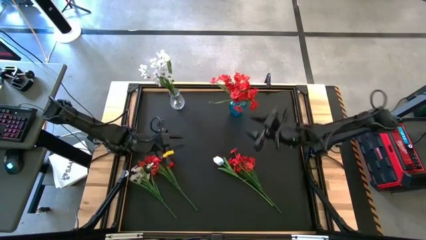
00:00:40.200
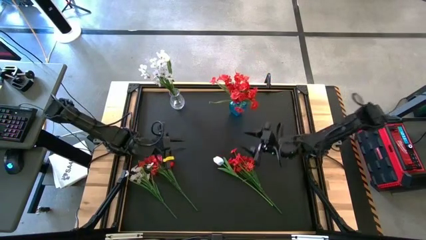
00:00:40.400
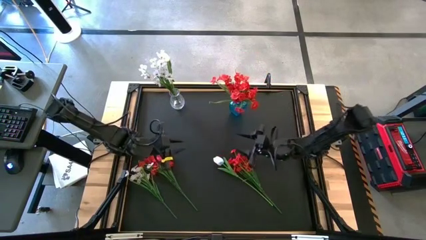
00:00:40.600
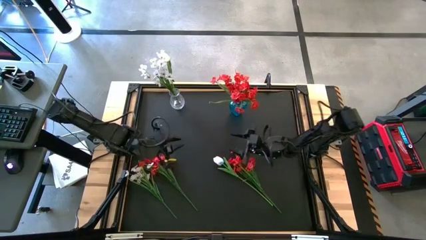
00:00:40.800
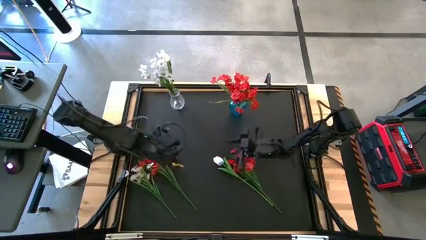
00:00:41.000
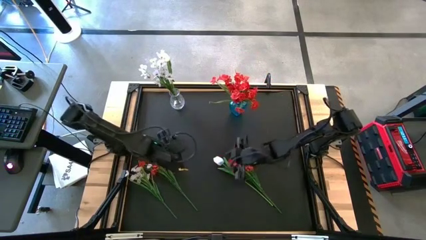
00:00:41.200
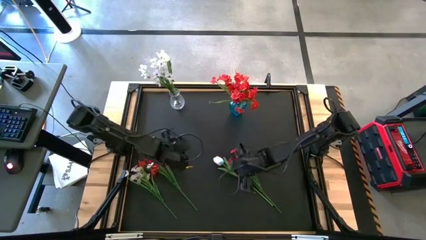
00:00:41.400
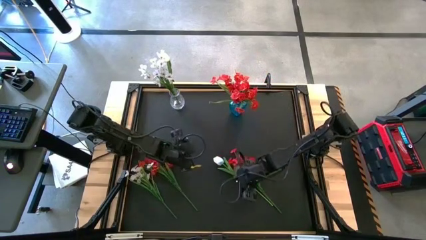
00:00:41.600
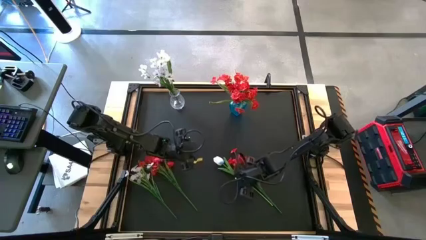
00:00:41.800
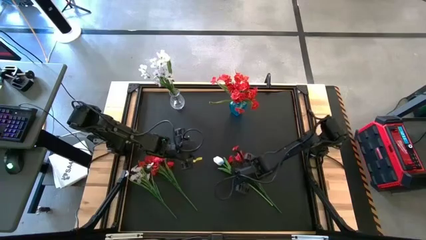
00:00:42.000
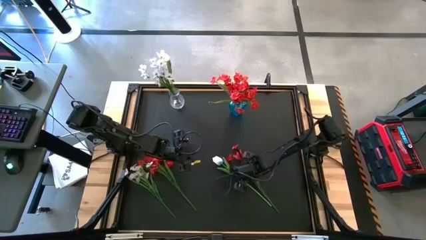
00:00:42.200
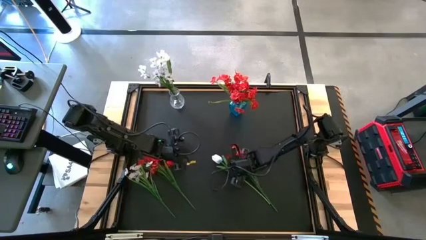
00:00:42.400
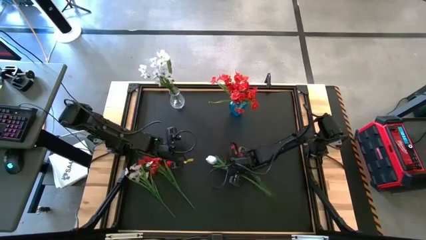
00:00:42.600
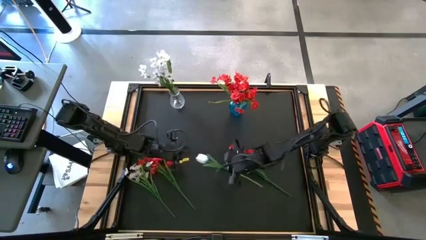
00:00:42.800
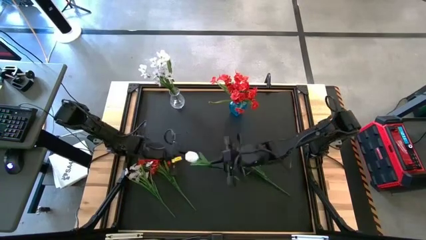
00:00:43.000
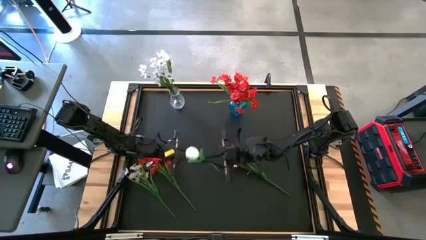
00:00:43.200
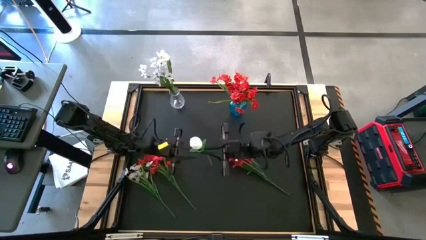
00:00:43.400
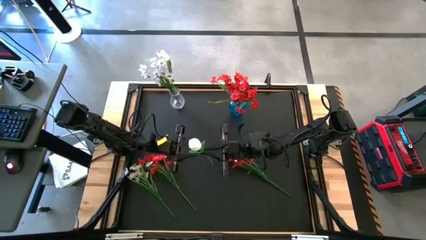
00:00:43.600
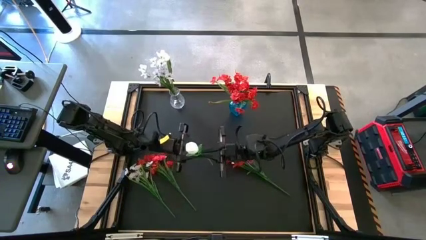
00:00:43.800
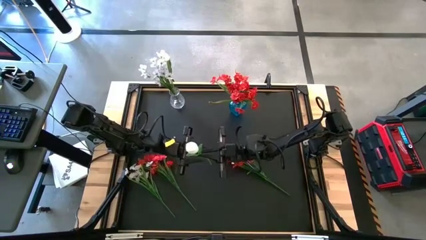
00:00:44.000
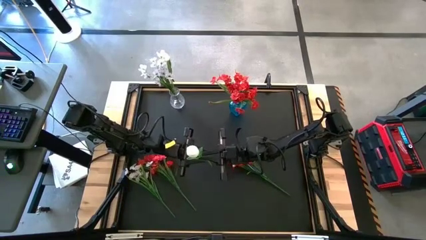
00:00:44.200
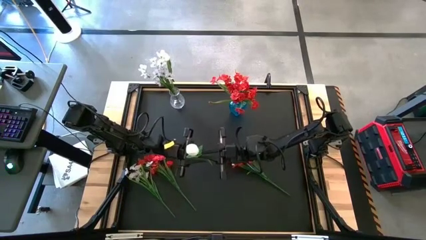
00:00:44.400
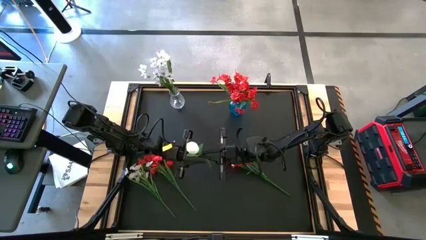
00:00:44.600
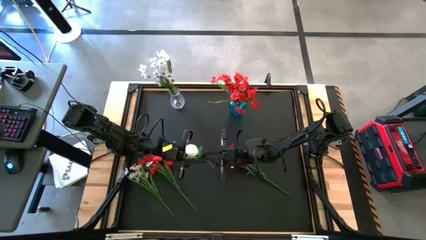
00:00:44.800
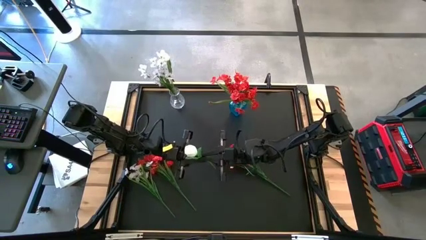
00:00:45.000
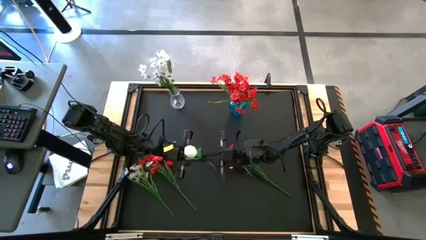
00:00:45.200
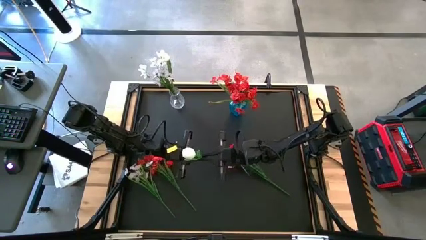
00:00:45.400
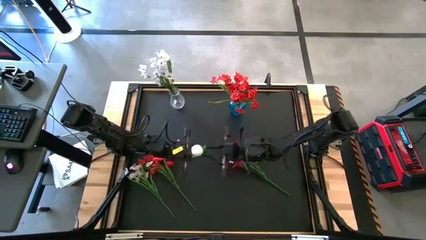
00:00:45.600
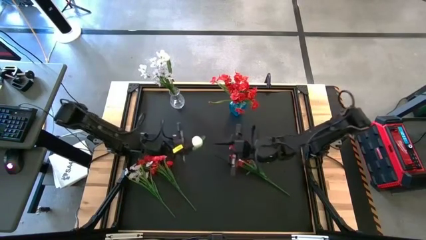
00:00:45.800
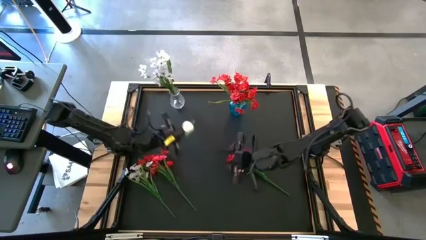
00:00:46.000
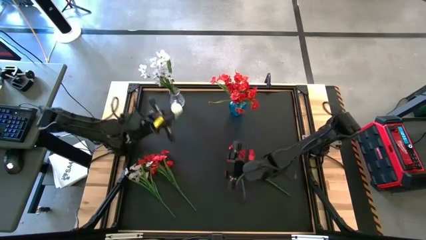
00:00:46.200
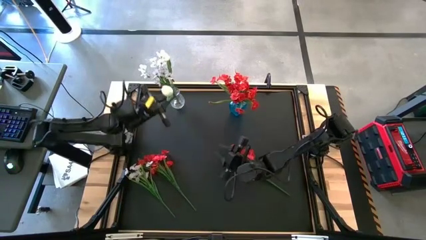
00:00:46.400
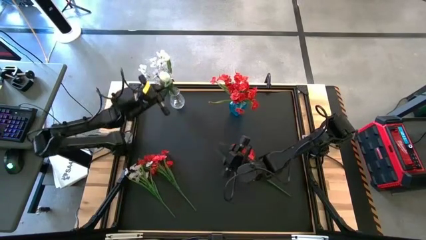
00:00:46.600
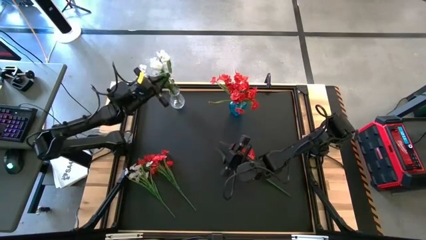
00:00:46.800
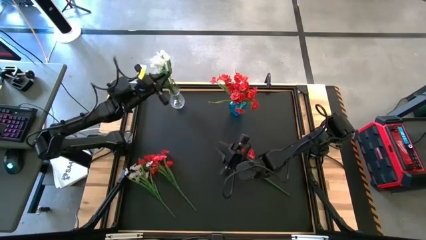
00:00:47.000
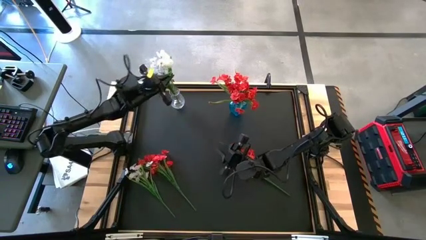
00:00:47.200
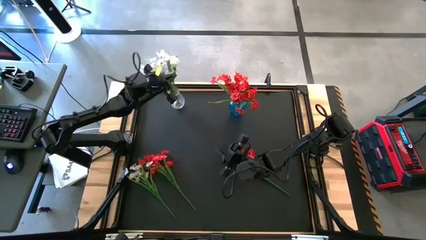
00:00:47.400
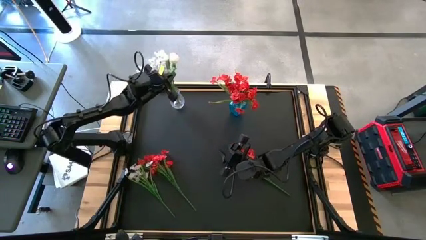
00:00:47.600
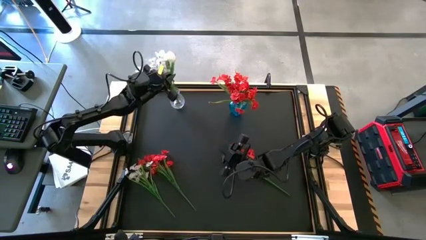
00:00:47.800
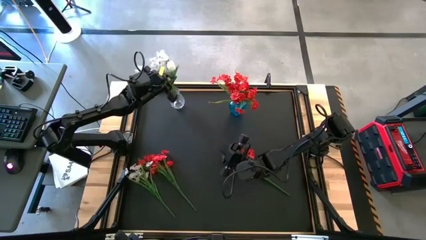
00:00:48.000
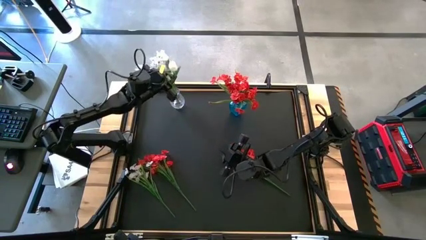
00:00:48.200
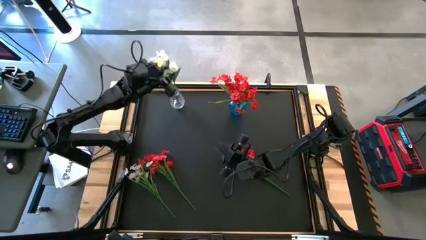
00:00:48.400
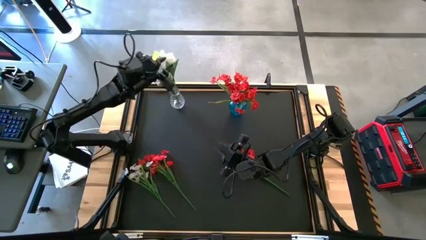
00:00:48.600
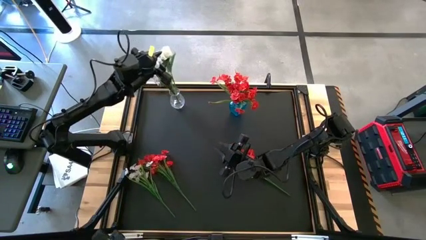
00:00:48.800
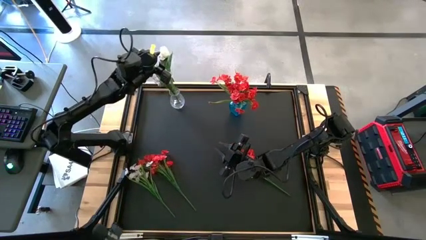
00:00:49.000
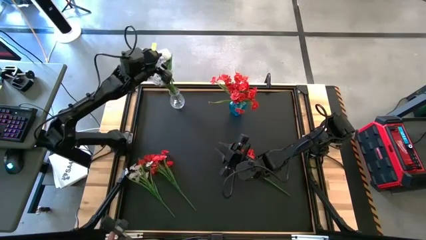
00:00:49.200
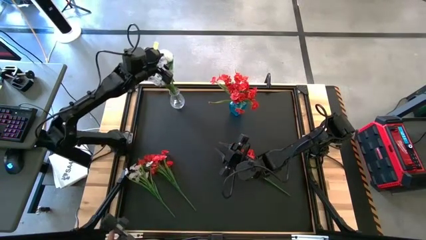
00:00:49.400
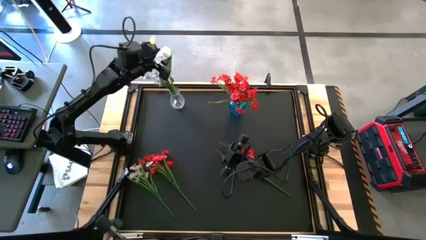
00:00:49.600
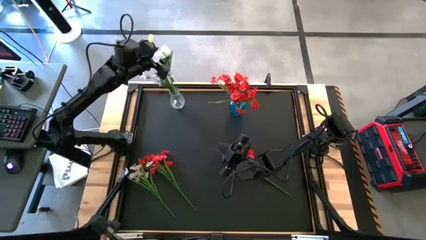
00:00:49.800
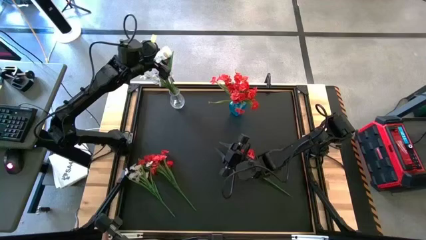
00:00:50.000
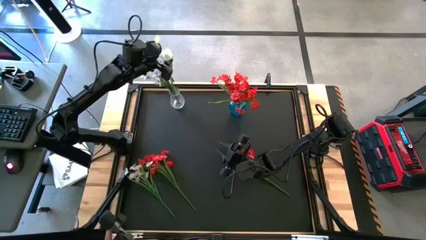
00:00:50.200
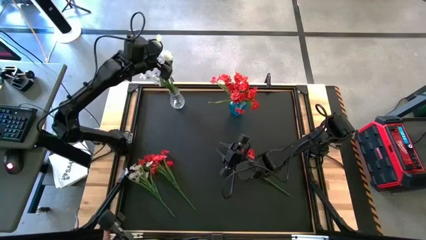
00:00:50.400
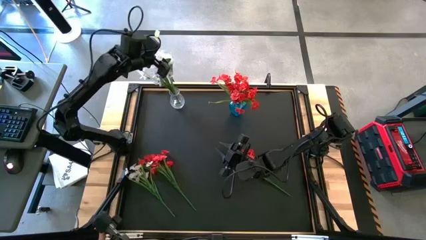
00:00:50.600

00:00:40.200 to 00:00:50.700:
Task: Sort flowers into vase by color
Put the white tulip into the transparent vase
